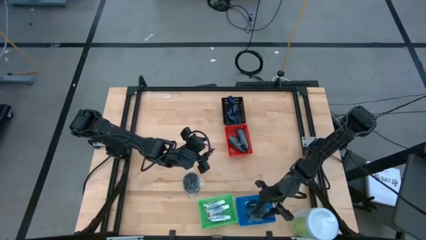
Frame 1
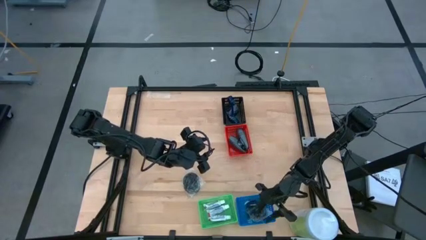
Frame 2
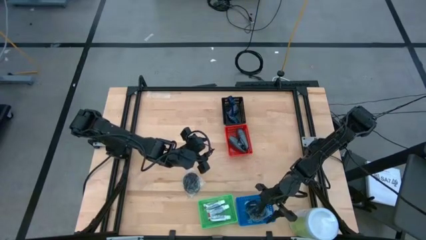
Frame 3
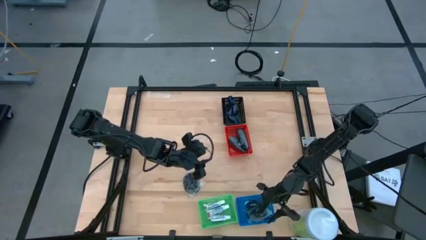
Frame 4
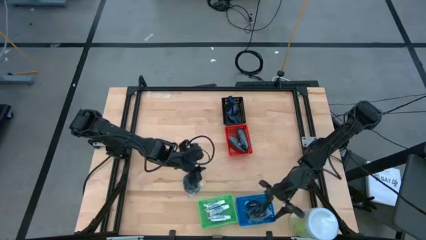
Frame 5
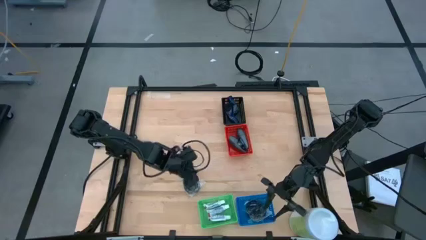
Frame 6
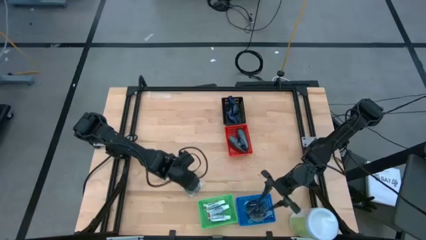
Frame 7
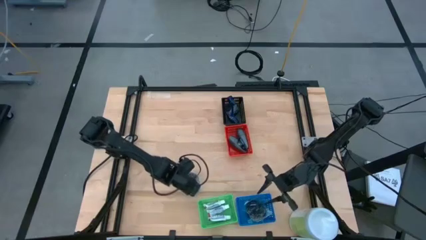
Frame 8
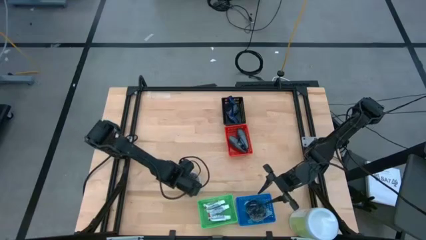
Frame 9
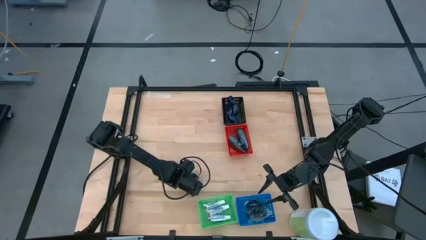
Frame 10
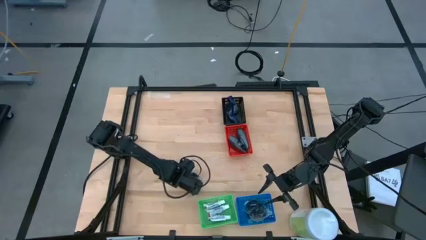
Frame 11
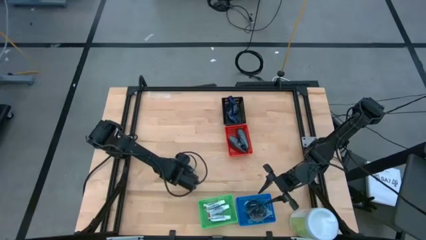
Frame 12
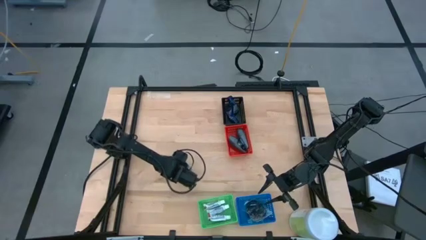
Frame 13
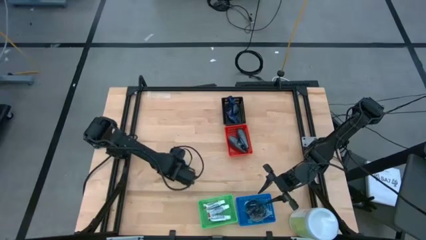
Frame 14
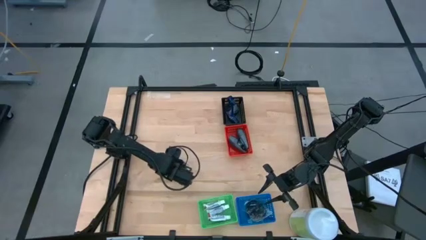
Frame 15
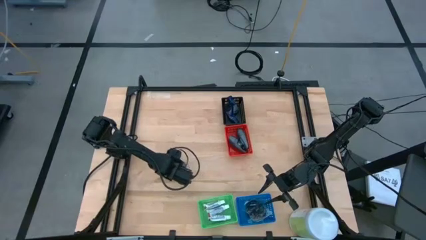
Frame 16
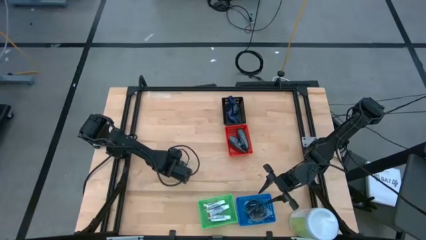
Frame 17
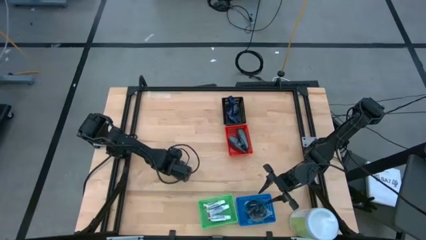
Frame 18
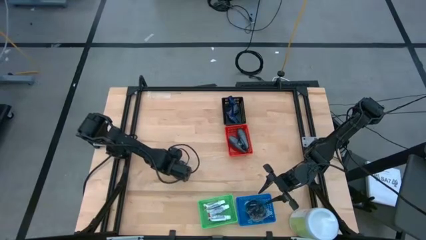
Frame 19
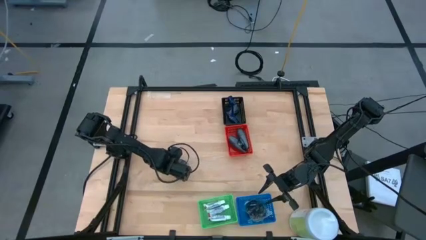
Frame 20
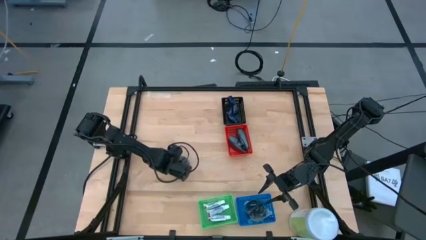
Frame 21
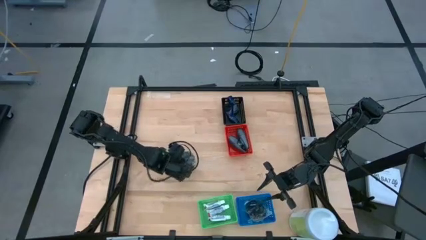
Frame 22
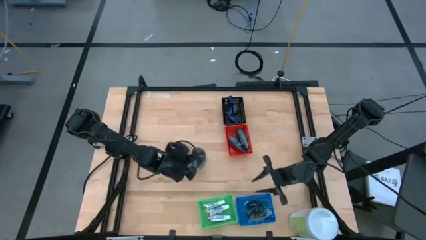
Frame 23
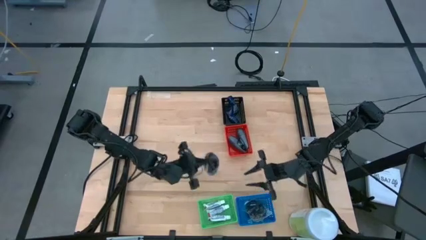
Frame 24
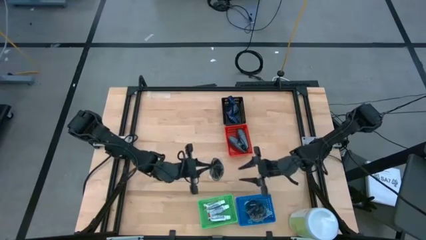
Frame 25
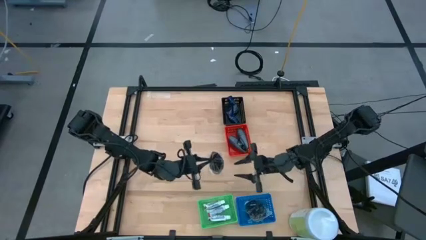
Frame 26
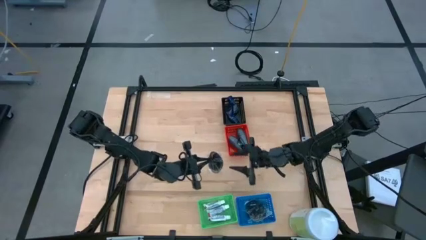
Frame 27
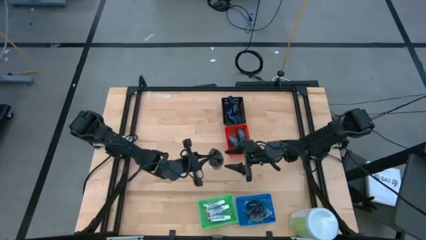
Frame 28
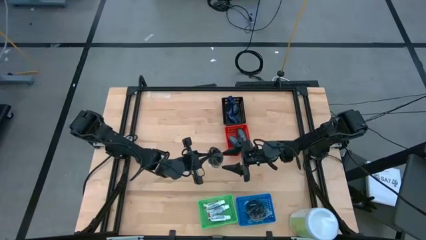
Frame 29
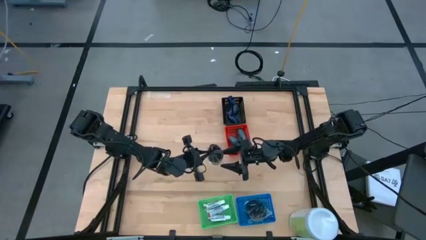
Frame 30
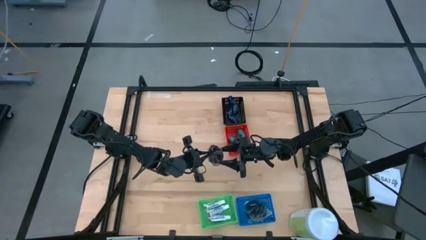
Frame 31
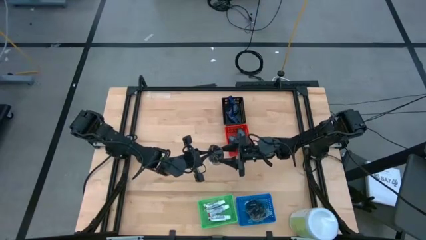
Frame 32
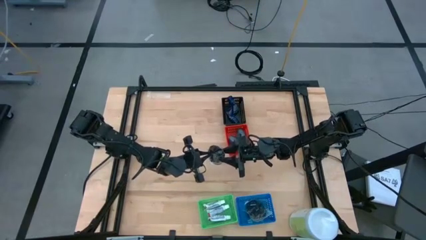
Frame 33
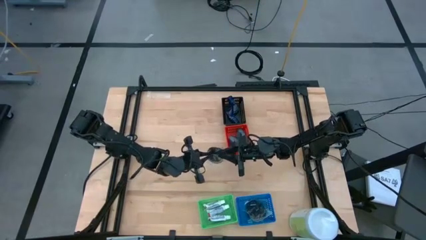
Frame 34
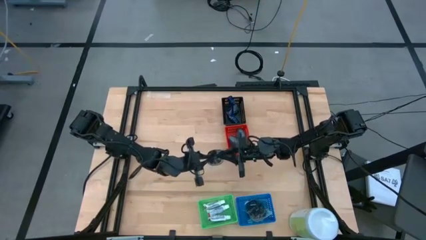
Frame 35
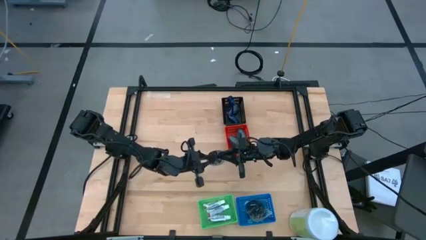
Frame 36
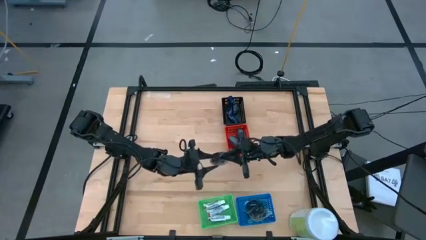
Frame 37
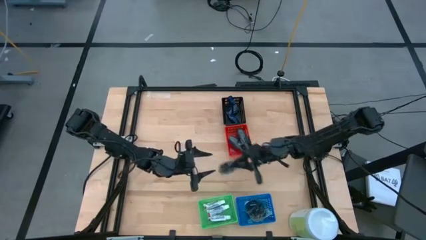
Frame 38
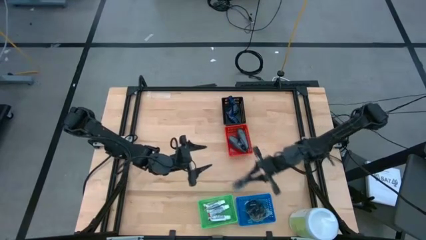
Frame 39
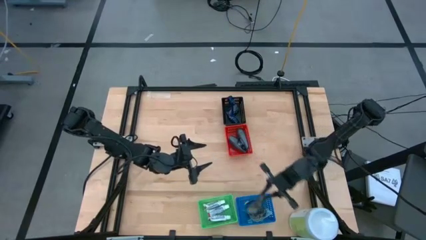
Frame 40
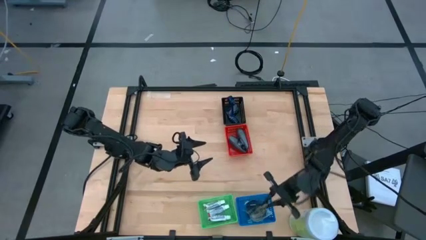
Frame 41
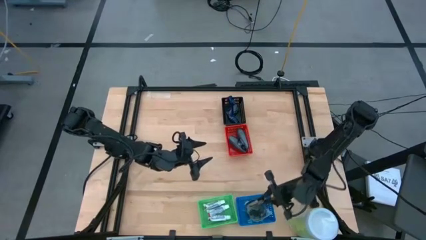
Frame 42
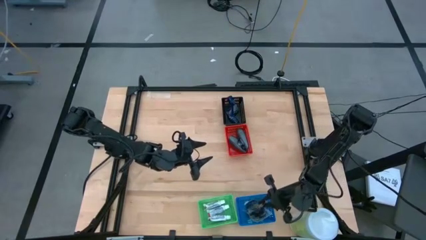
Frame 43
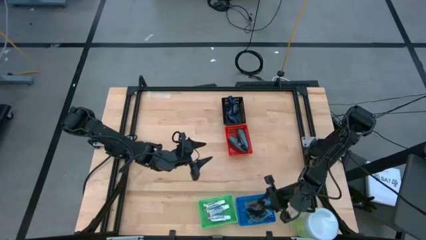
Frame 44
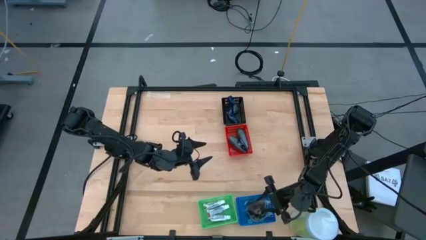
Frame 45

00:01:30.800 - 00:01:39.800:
Task: Pick & Place Travel size toiletries
Put the black hairbrush into the blue bin
